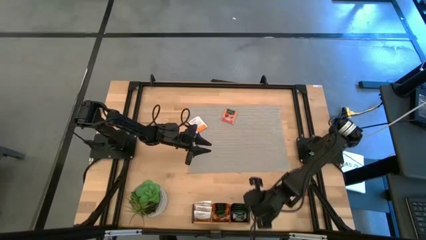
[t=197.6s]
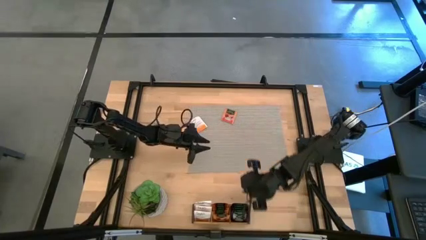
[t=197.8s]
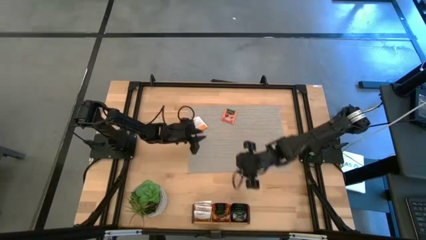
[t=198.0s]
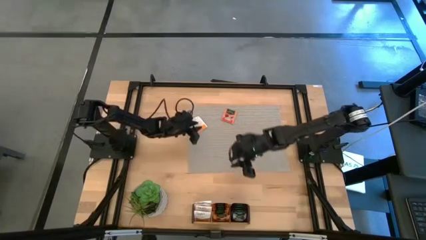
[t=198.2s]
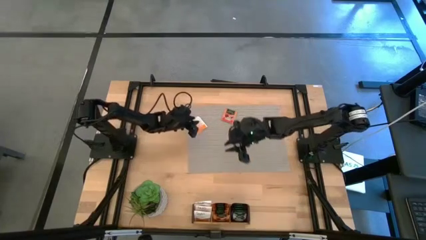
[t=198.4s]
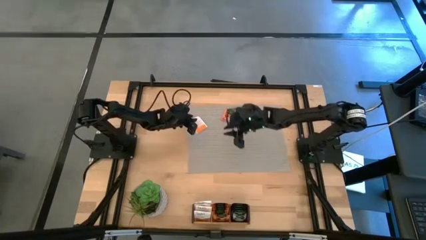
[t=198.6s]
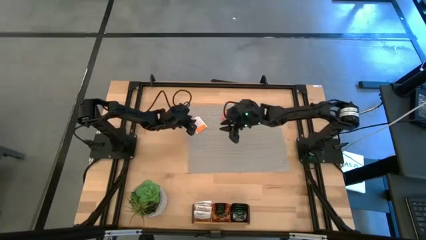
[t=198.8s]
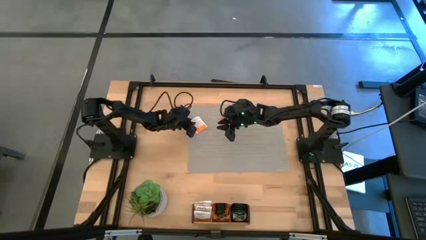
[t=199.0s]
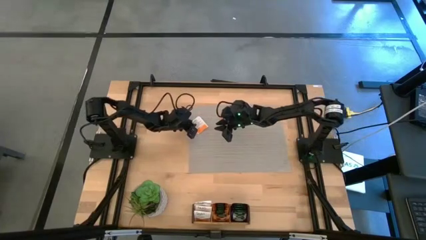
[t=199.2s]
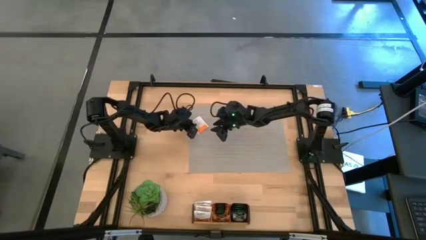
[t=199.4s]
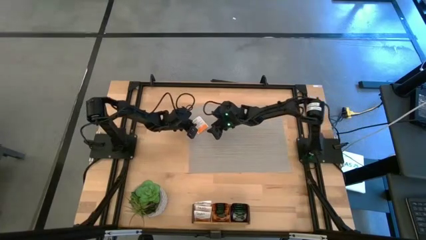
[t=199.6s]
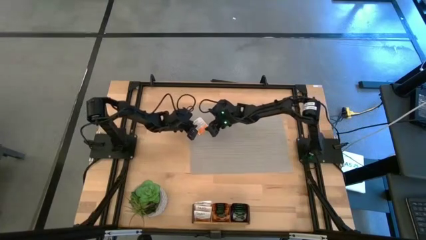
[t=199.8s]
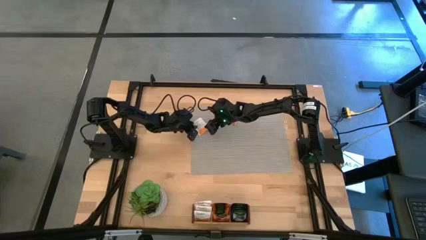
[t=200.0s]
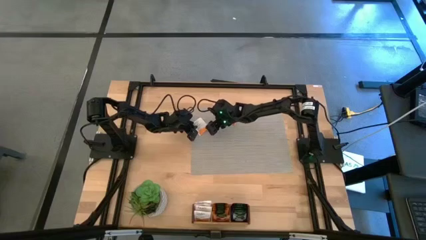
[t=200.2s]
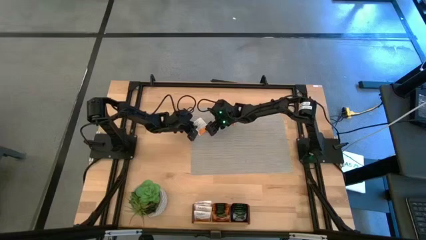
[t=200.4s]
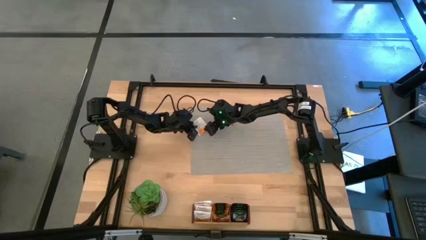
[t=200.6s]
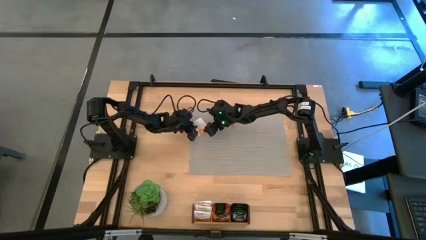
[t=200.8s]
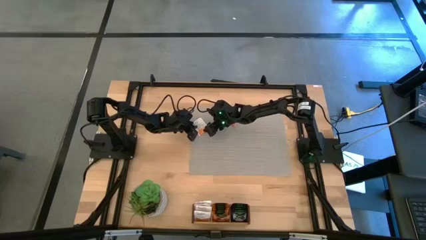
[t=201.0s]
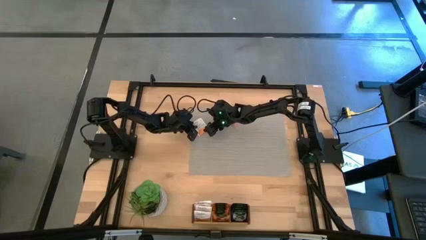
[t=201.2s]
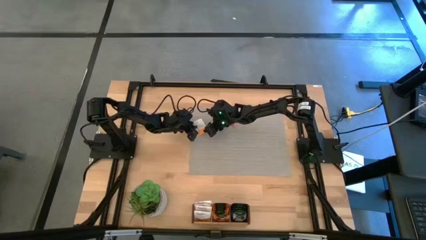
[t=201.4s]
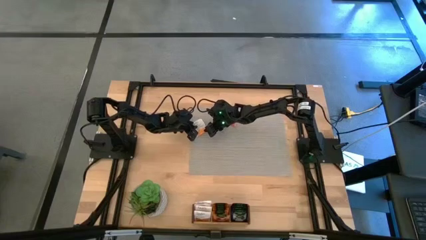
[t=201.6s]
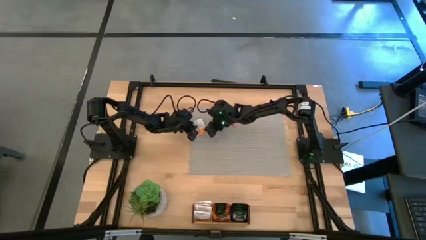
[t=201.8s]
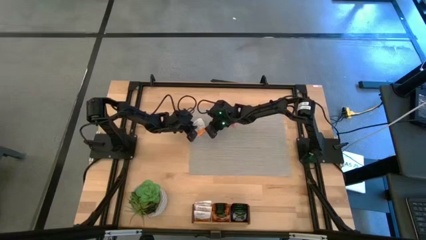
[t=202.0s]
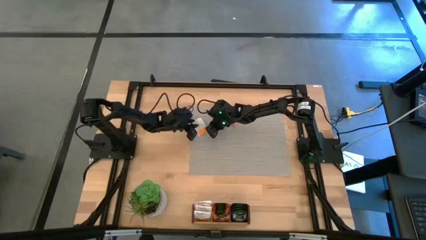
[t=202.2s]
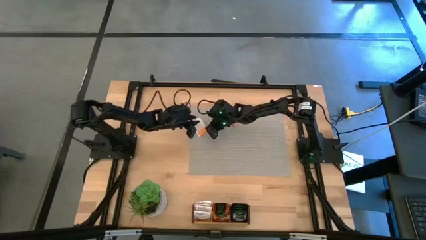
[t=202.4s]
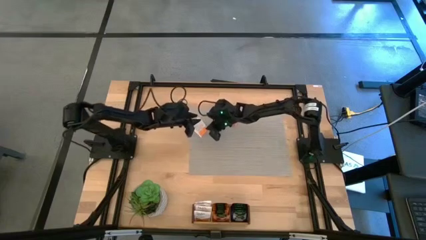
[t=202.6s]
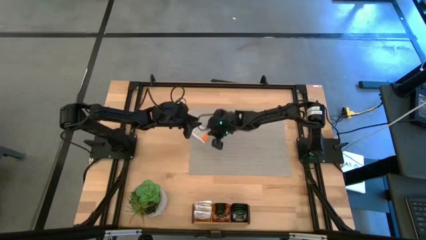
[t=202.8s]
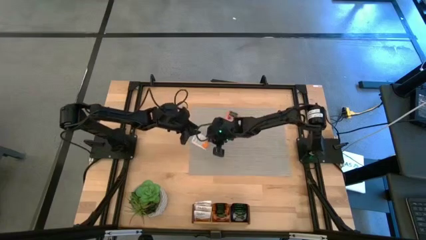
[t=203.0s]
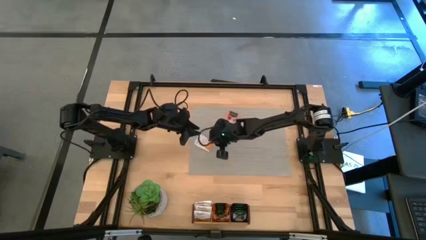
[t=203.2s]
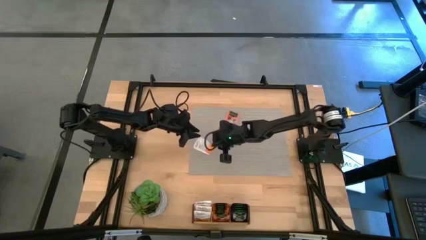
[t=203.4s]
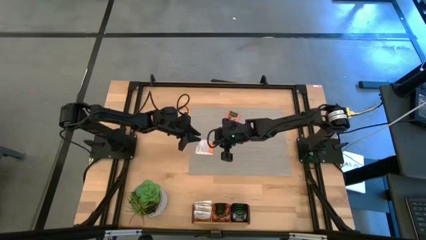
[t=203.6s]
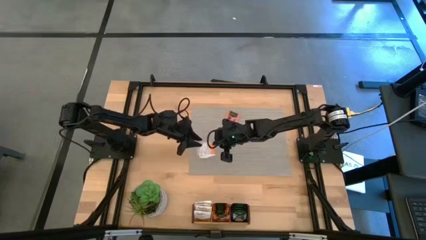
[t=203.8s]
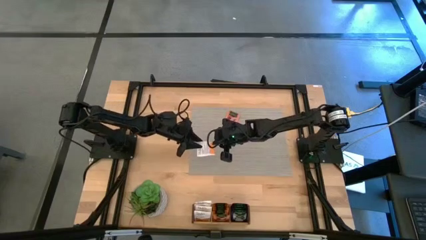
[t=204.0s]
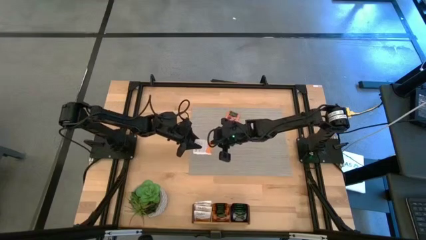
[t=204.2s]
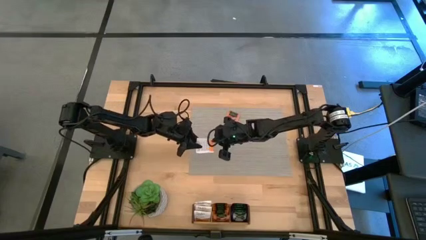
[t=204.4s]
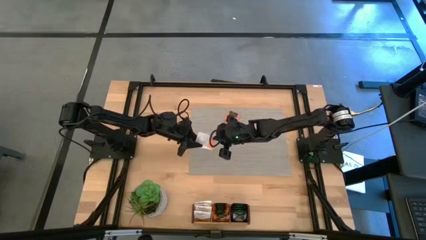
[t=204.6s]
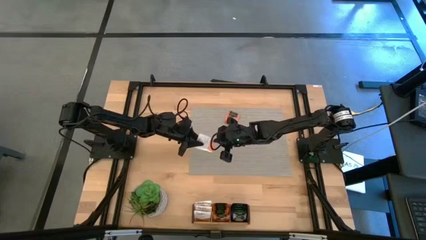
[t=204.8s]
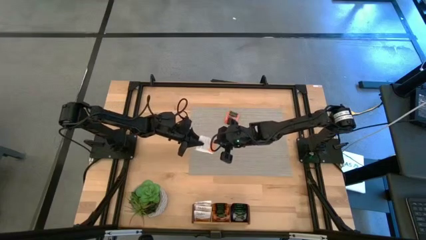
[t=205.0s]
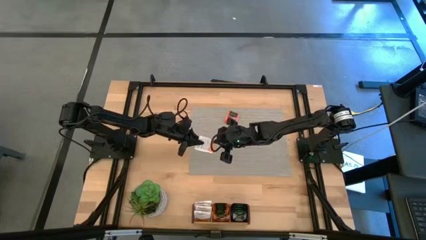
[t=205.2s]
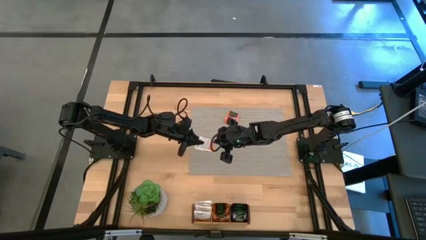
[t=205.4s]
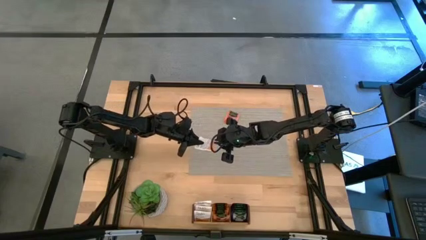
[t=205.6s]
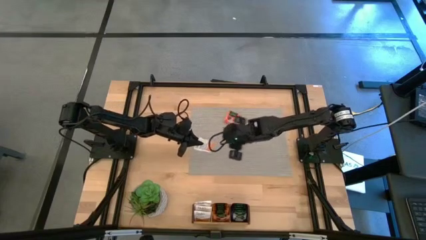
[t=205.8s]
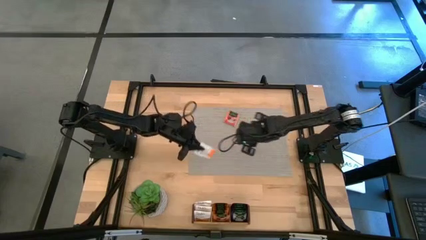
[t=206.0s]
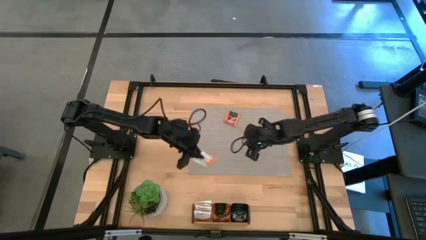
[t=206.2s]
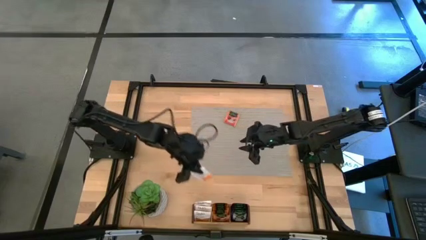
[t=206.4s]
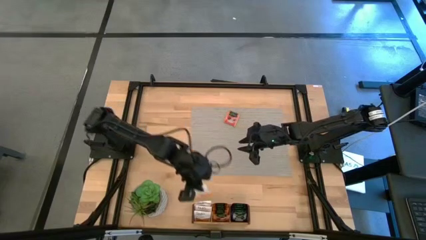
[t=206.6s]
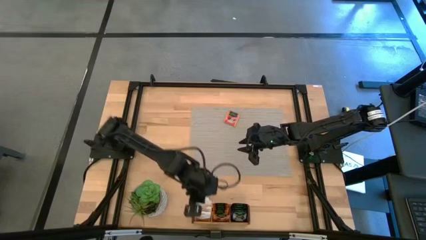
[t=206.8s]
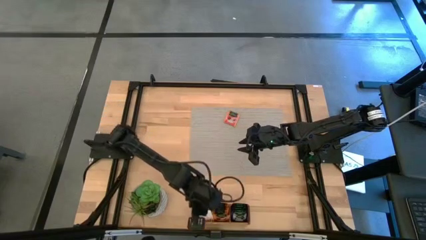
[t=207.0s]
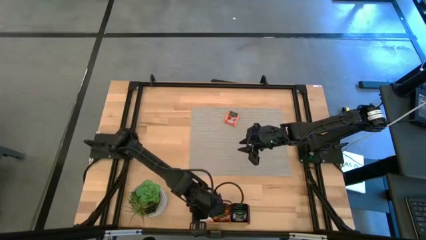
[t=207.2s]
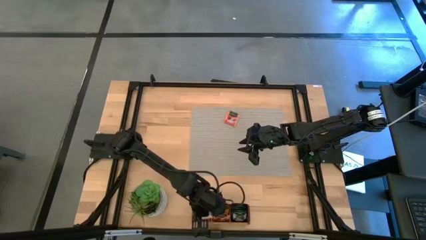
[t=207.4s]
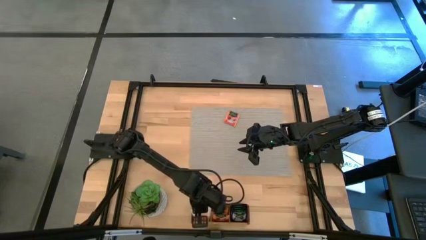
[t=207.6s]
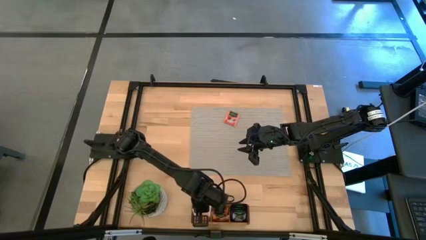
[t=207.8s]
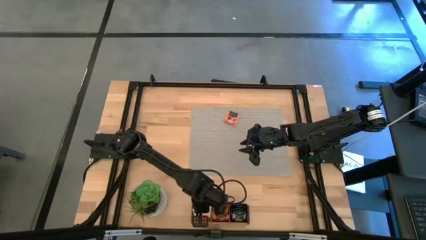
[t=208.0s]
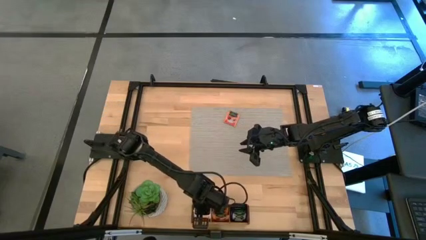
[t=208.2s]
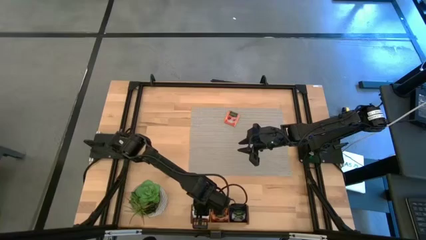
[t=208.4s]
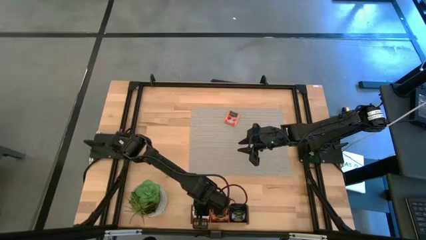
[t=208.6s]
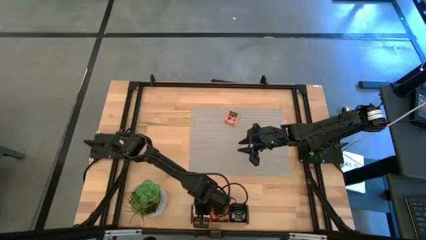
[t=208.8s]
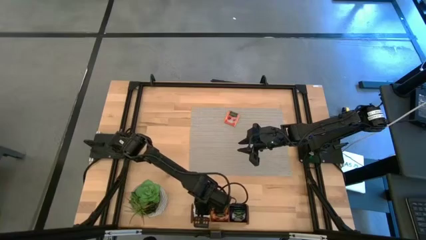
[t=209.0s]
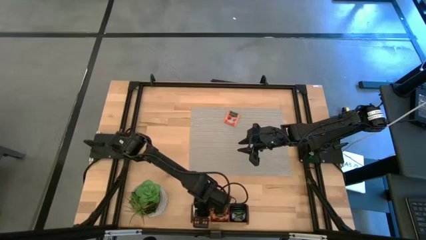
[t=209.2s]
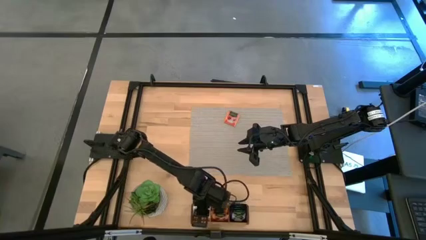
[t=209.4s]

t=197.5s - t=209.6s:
Task: Pick & Place Tea
Put the white and orange tea bag into the left section of the wooden organizer
